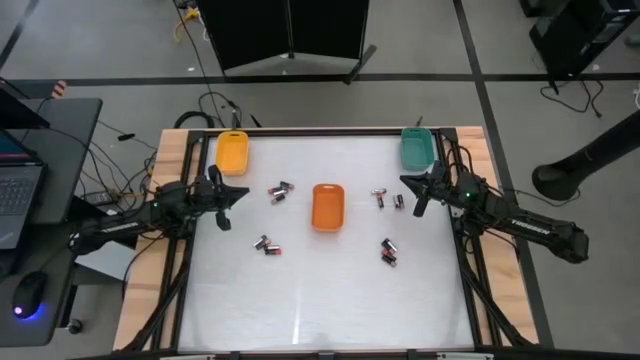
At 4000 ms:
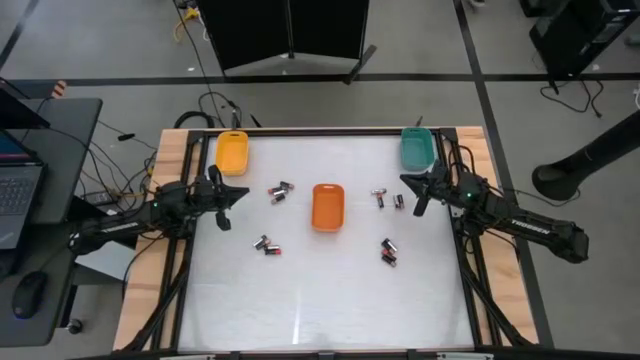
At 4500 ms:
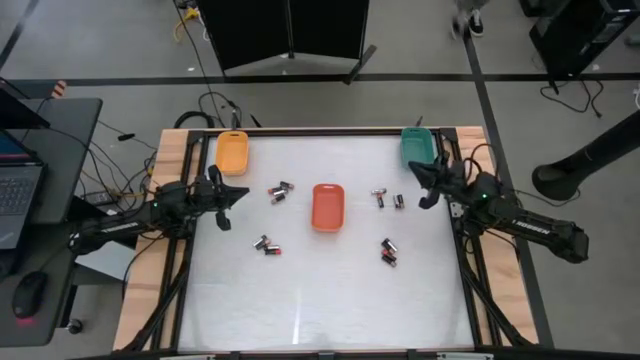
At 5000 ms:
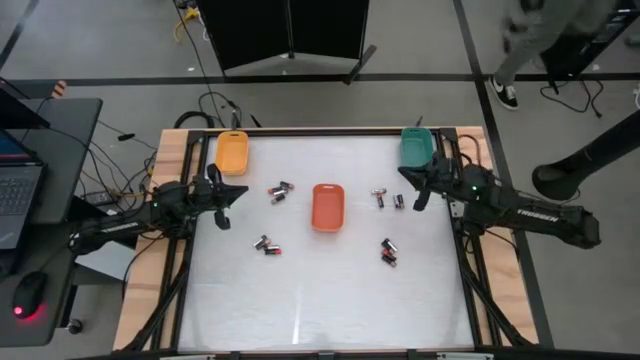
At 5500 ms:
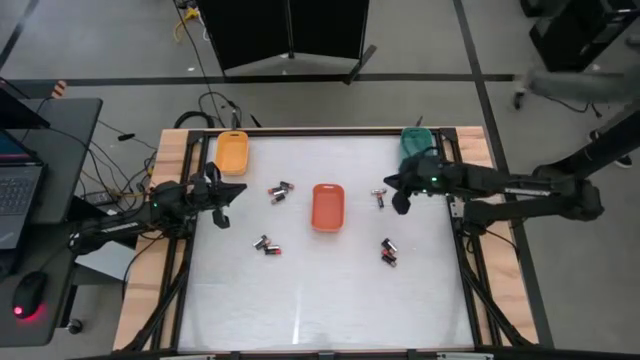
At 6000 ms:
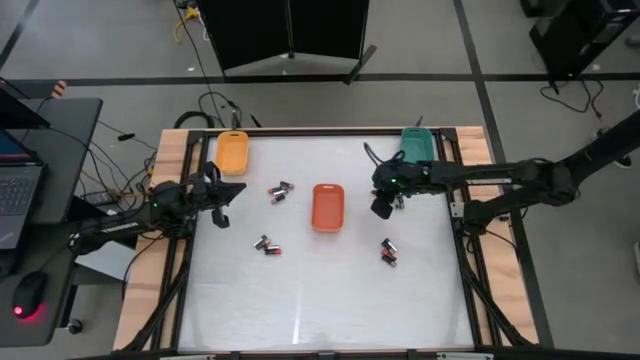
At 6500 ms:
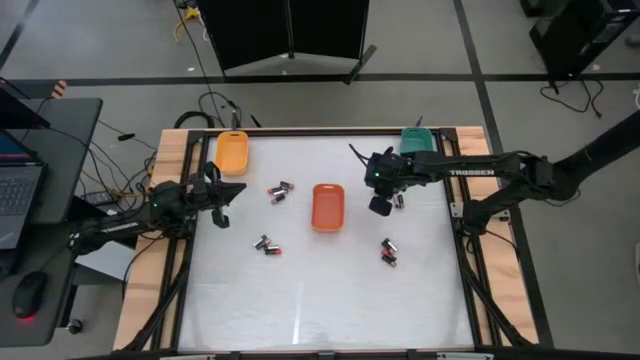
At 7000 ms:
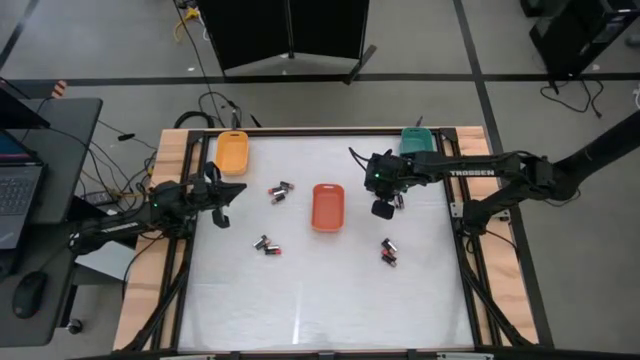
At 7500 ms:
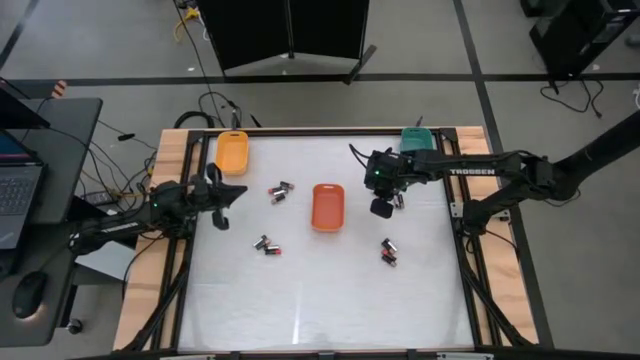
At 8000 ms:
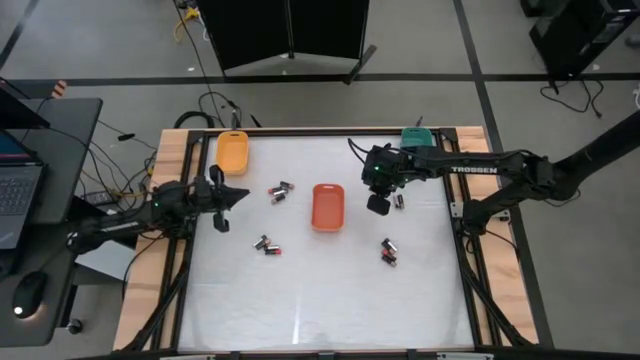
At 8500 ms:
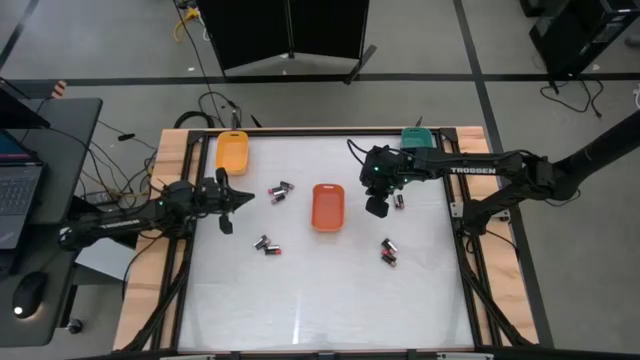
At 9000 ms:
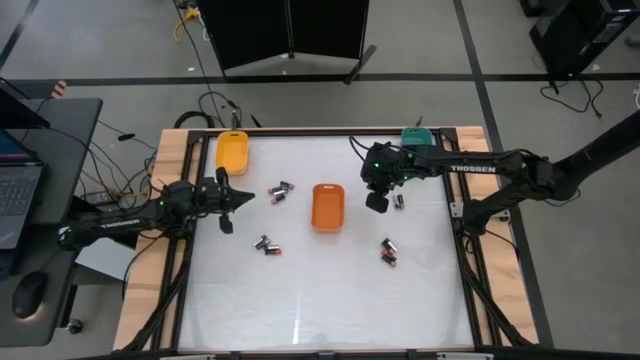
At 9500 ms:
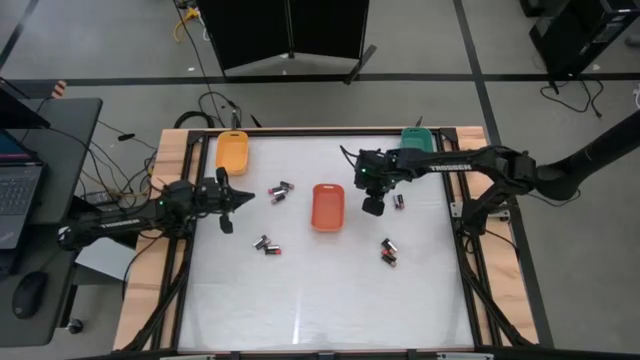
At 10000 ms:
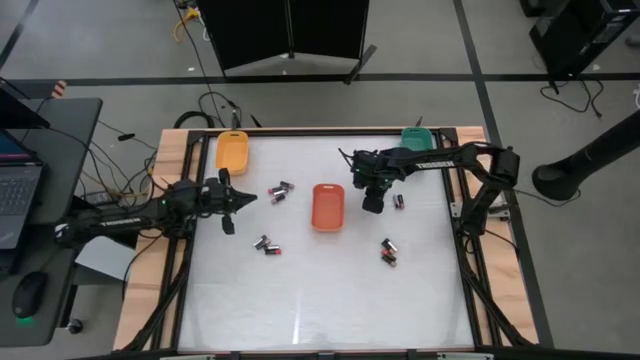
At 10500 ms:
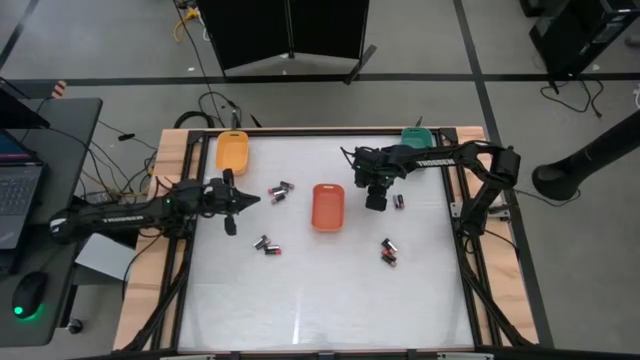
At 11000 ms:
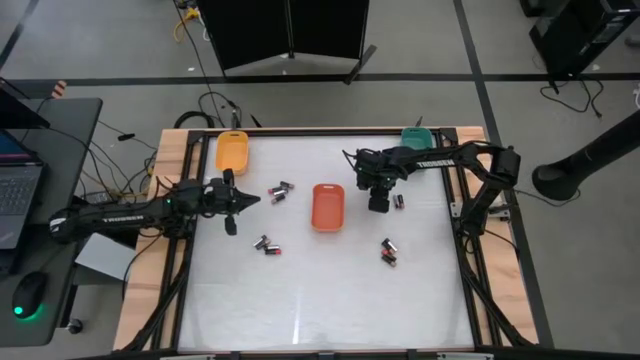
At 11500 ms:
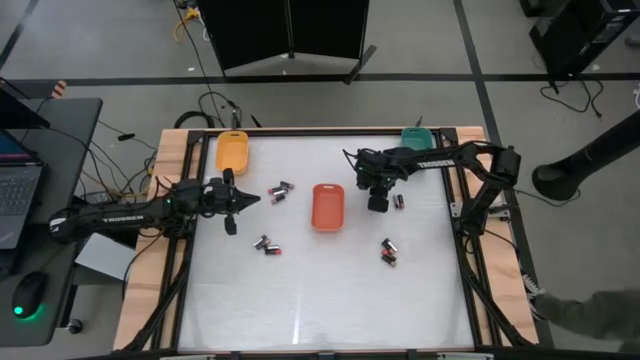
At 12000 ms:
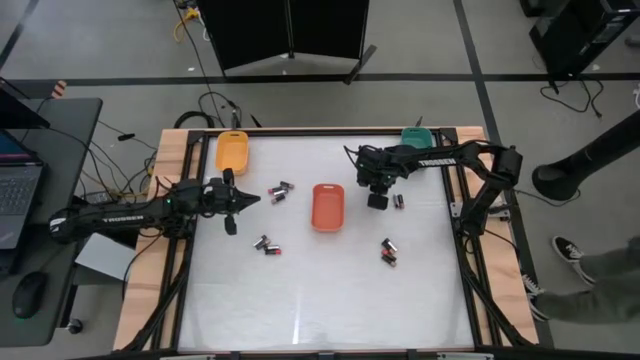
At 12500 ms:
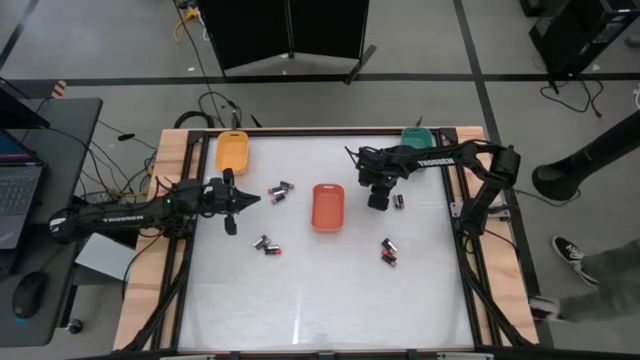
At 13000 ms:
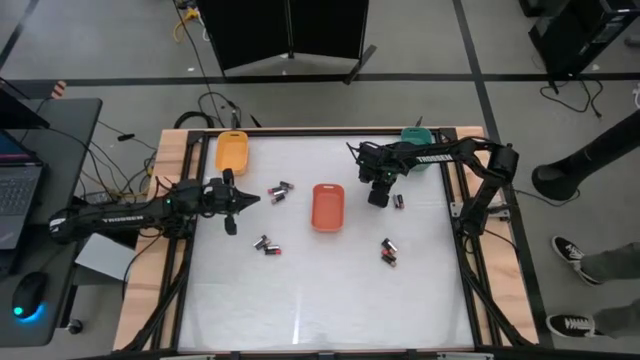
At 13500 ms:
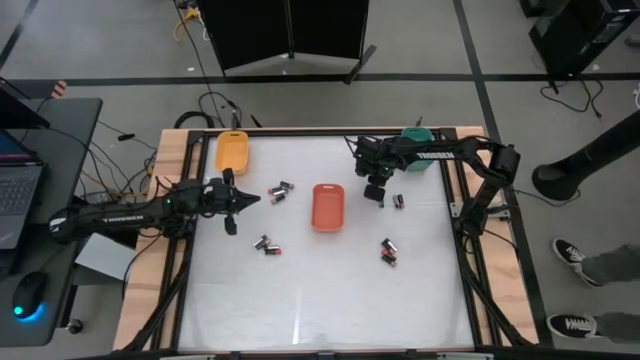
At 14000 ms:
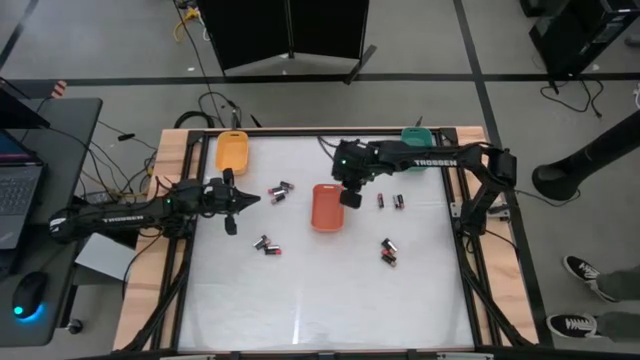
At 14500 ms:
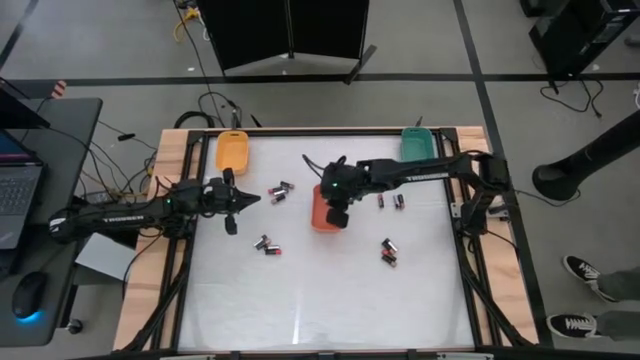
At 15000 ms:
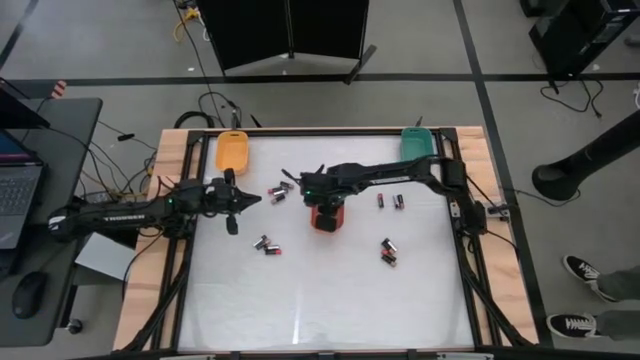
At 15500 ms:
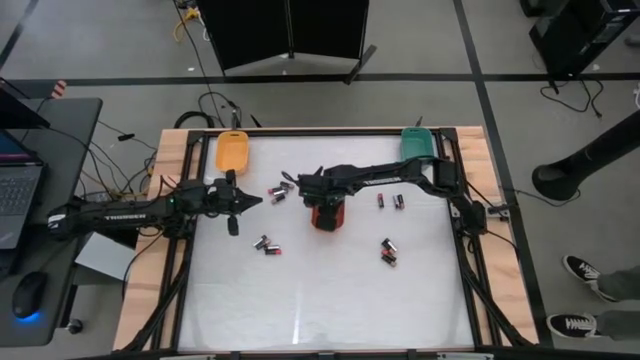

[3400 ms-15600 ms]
Task: Sort batteries
Put the silver battery into the orange bin

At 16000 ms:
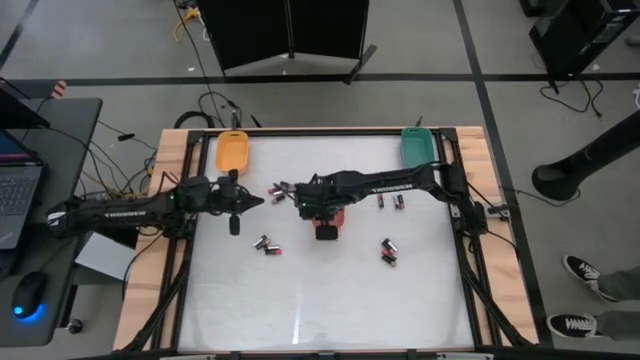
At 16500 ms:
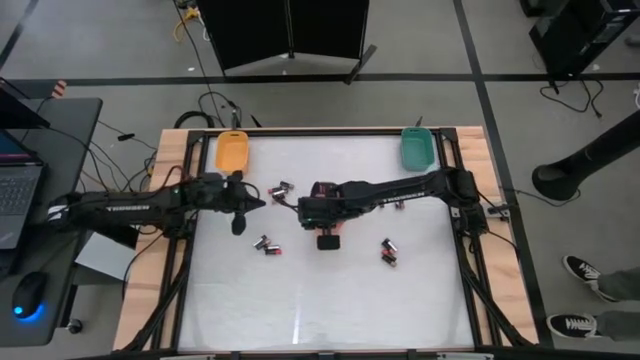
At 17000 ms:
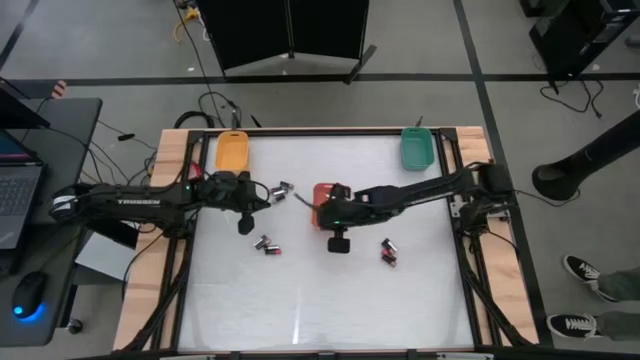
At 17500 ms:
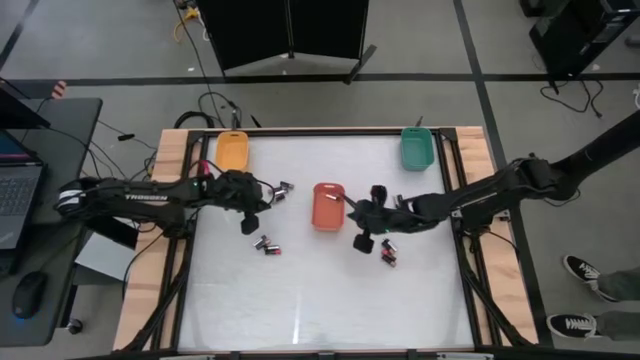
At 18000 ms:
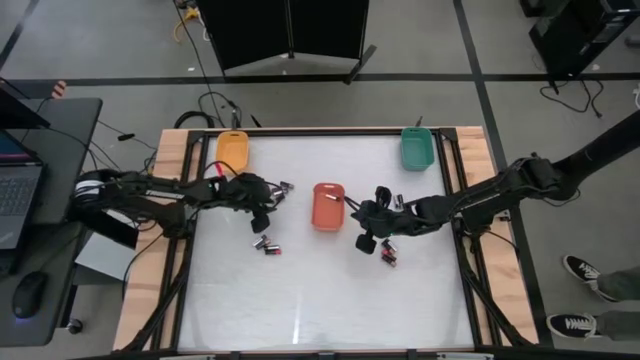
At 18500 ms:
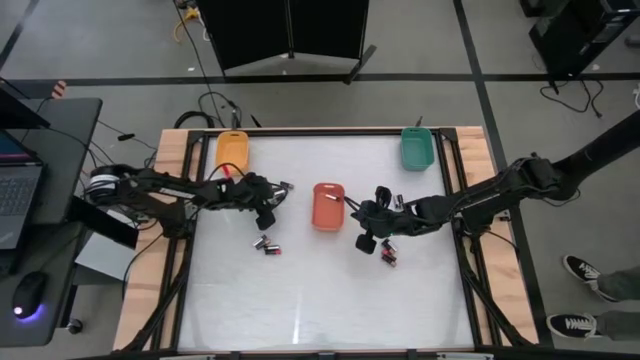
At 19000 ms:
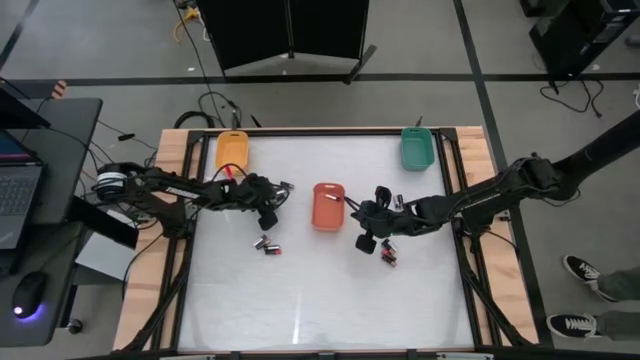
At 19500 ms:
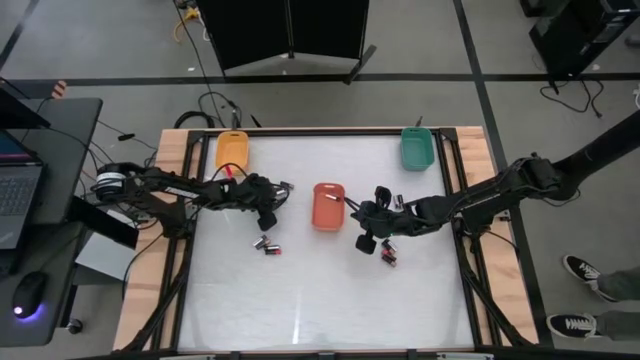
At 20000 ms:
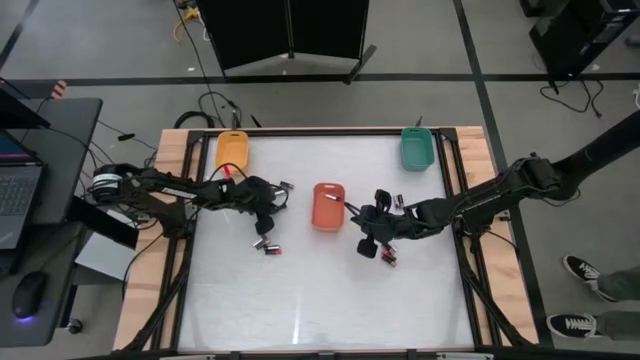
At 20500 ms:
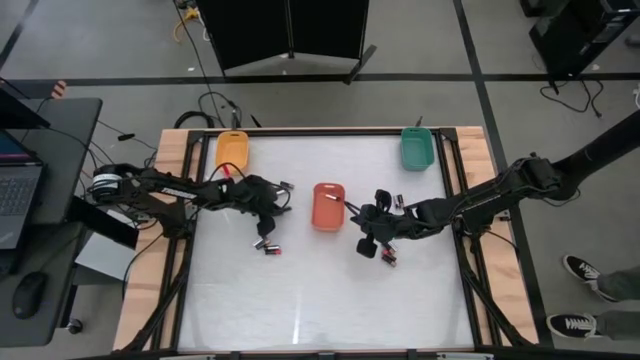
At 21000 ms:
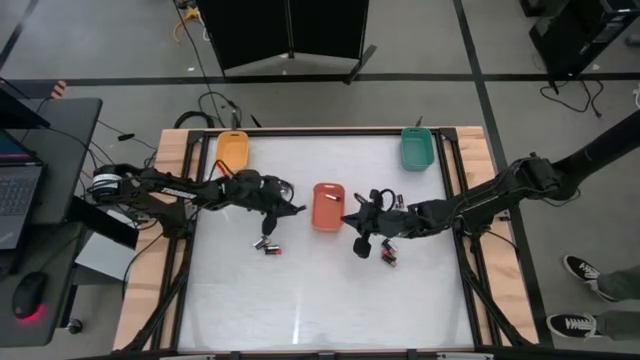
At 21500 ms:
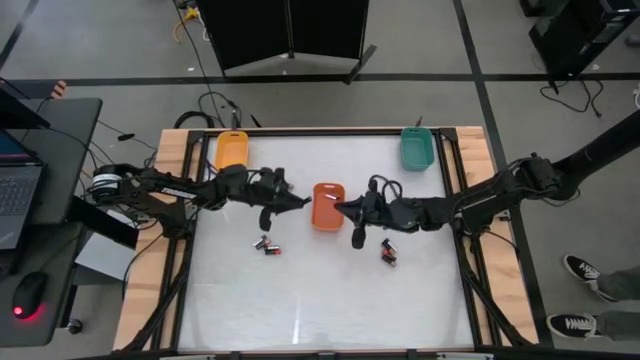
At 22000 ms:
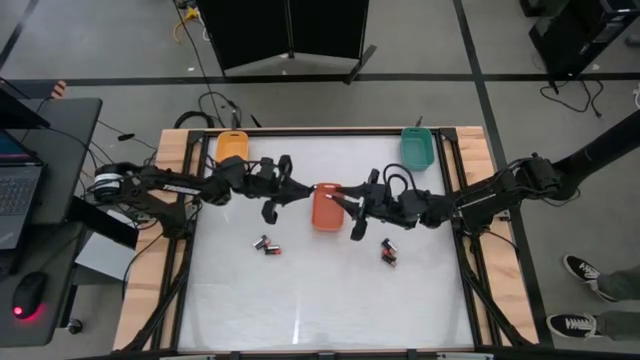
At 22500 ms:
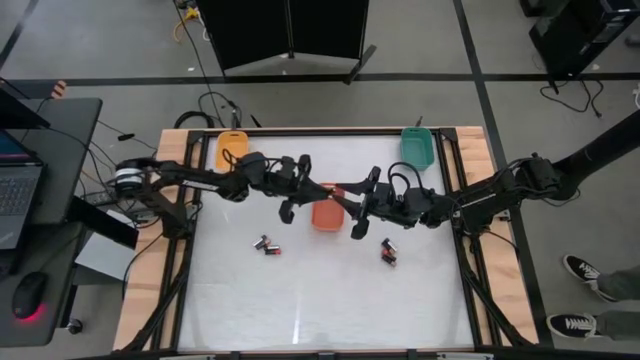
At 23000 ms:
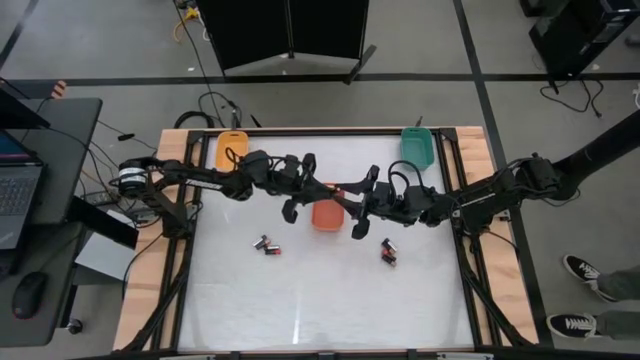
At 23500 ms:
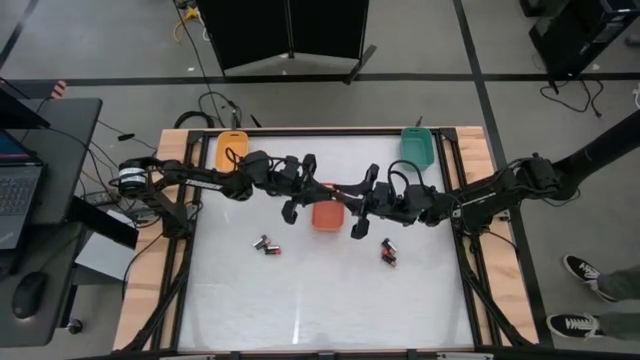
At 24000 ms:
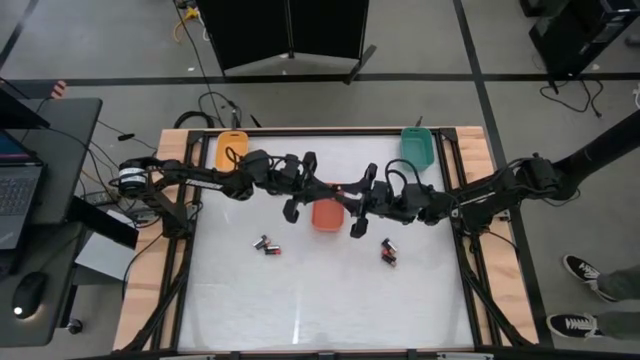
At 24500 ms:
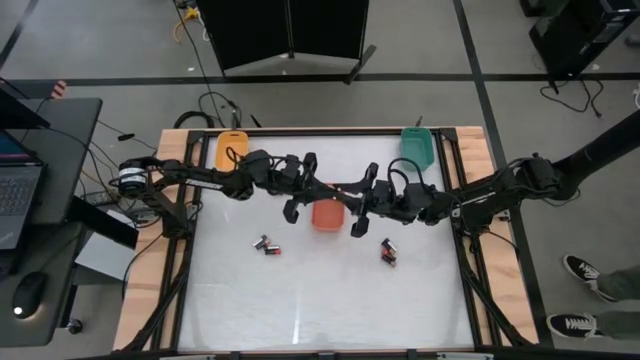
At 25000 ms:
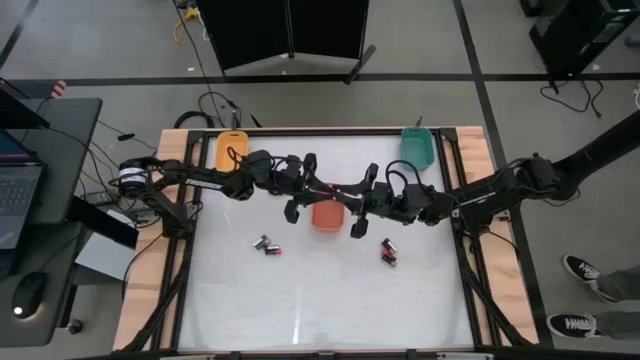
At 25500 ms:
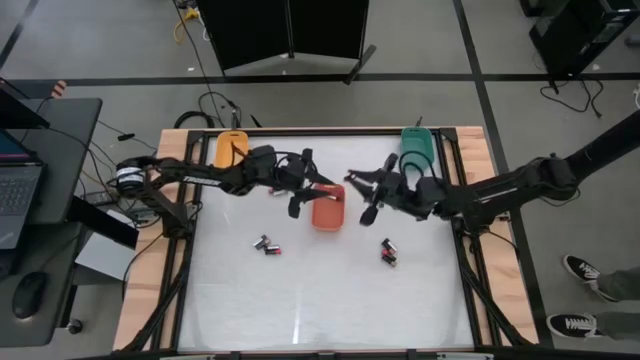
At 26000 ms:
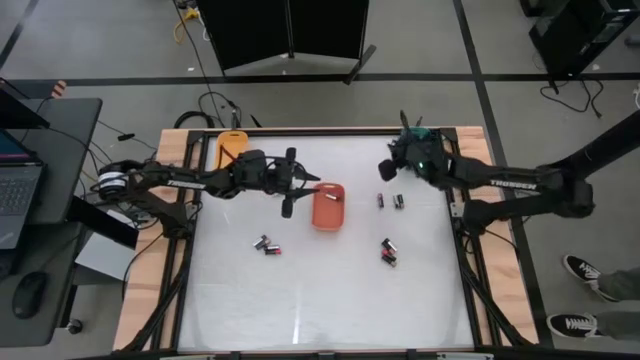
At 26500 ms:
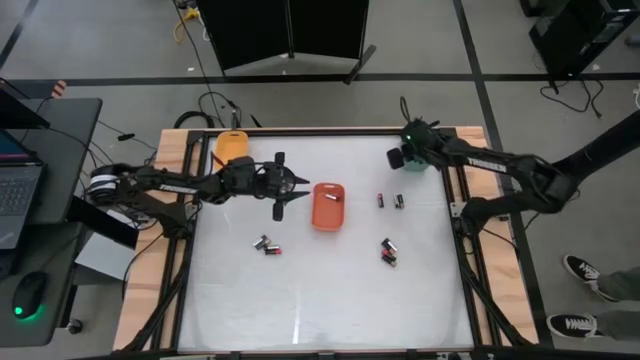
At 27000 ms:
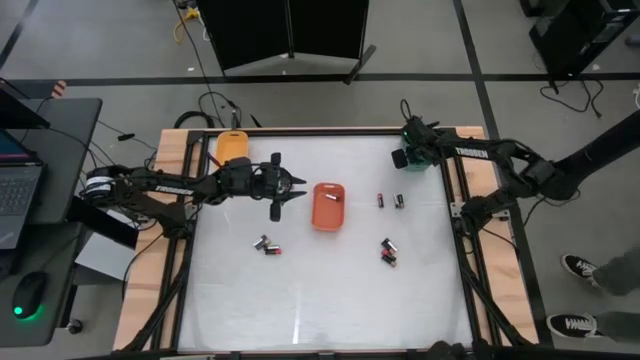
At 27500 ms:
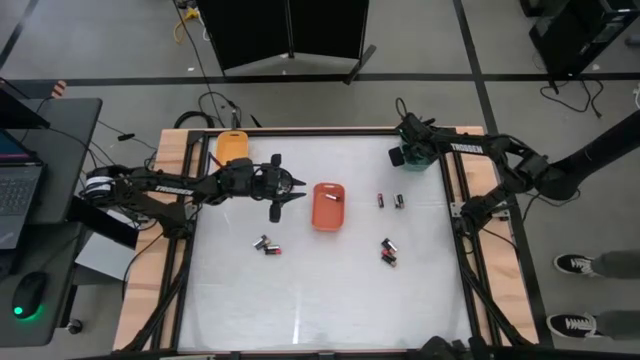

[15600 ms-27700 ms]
Put the black-brown battery into the green bin
